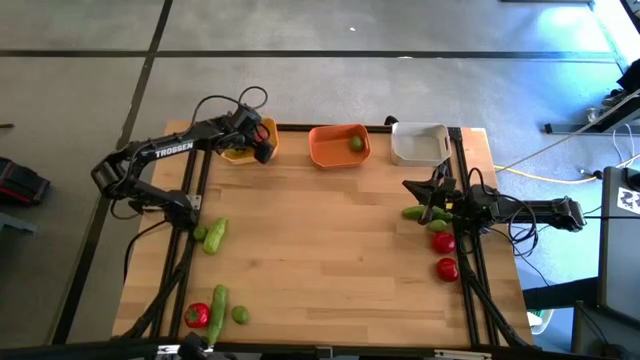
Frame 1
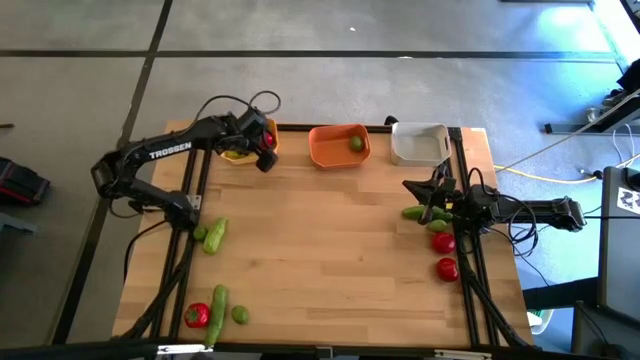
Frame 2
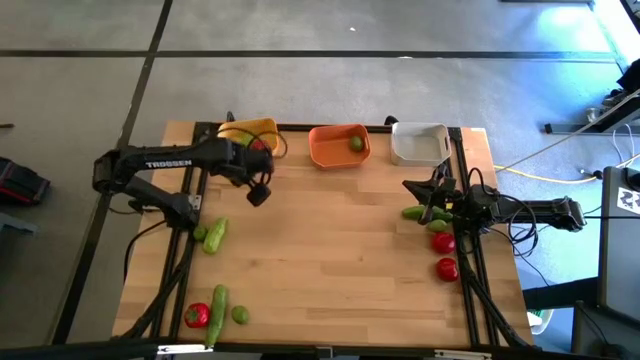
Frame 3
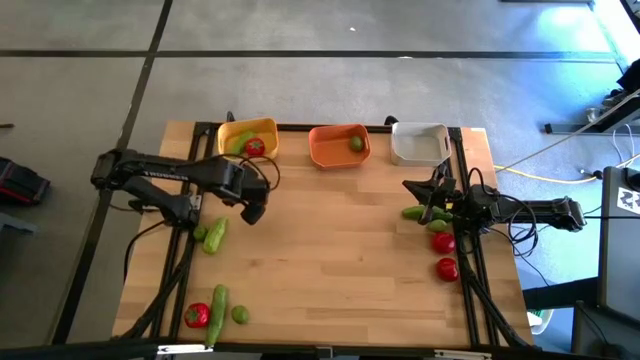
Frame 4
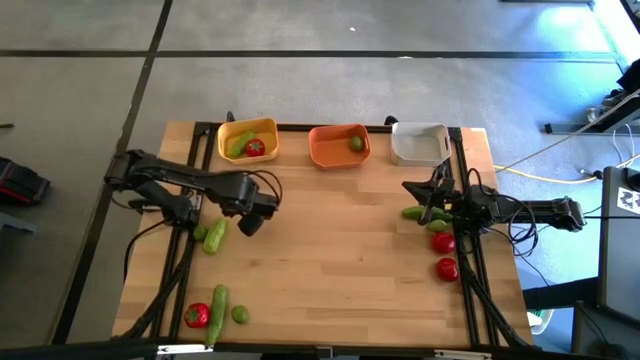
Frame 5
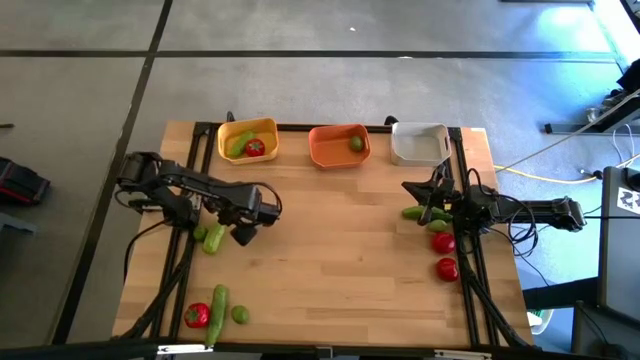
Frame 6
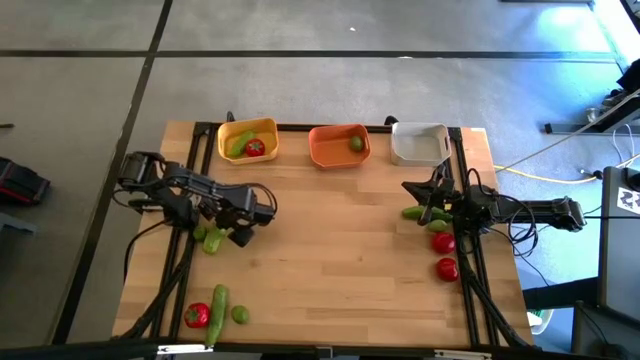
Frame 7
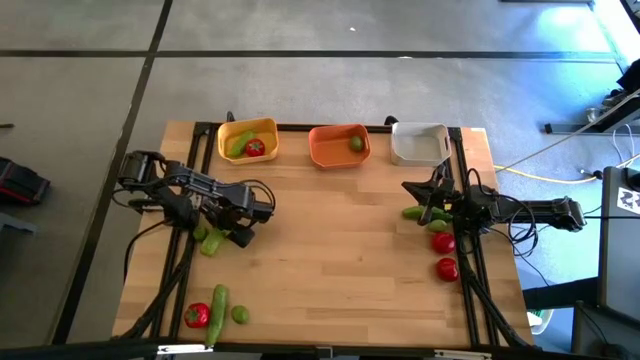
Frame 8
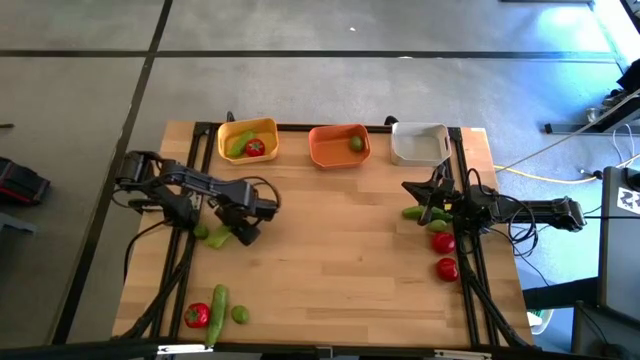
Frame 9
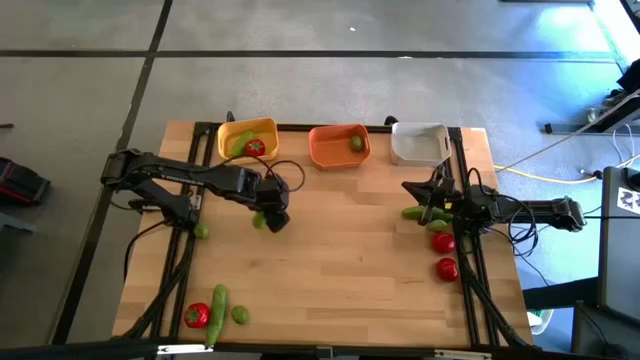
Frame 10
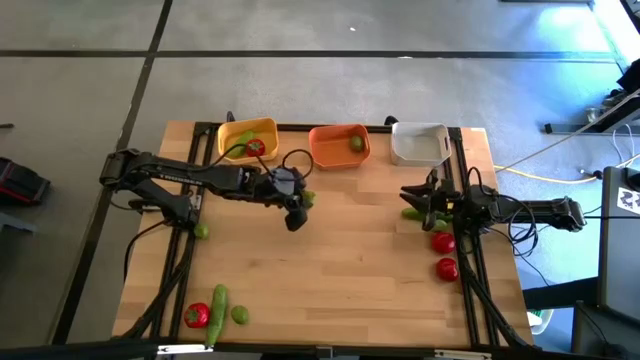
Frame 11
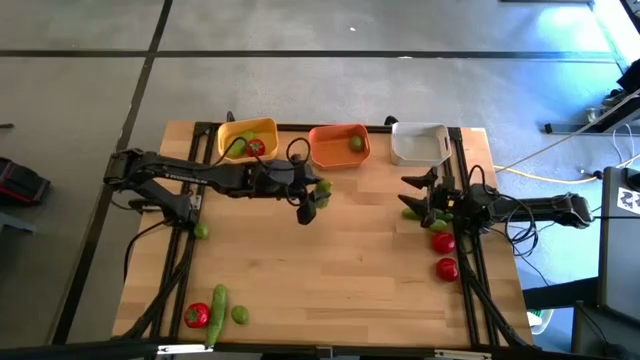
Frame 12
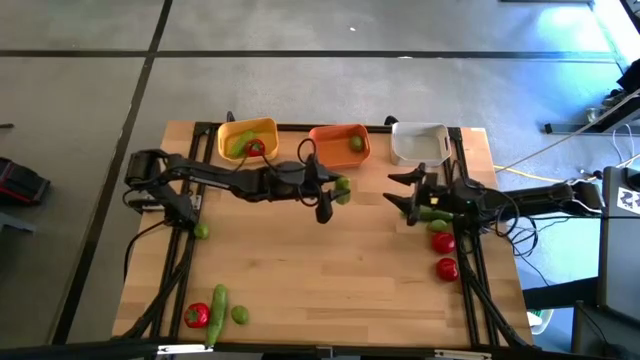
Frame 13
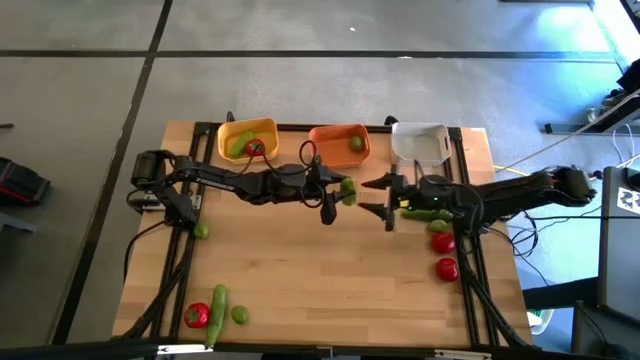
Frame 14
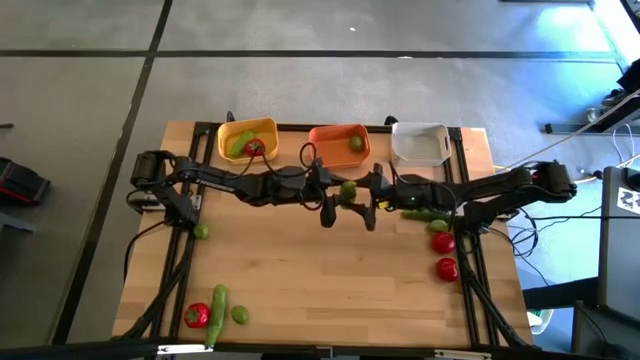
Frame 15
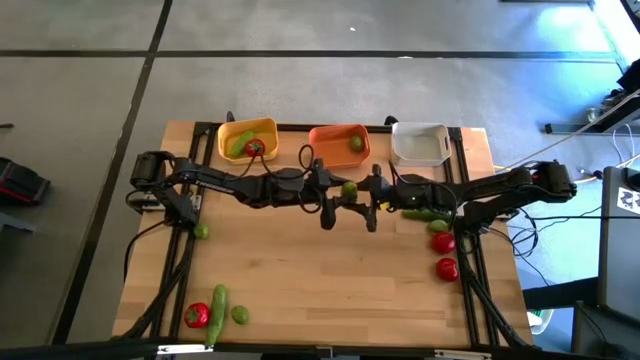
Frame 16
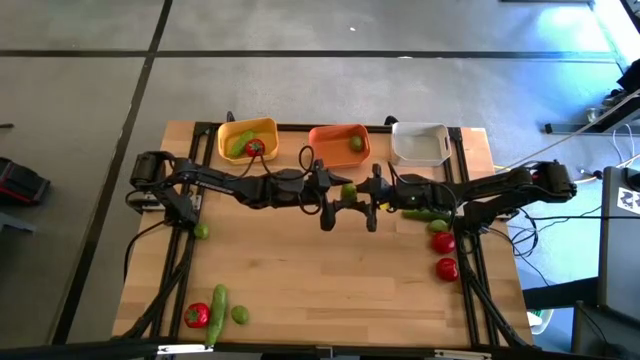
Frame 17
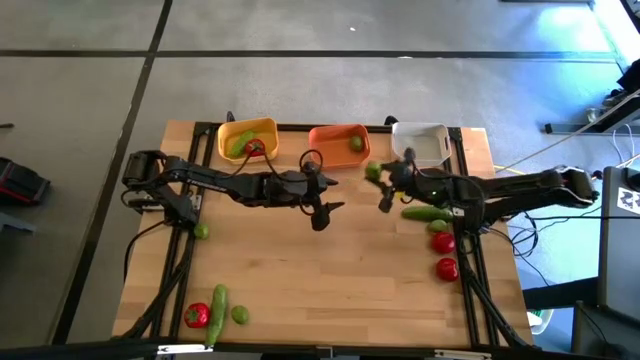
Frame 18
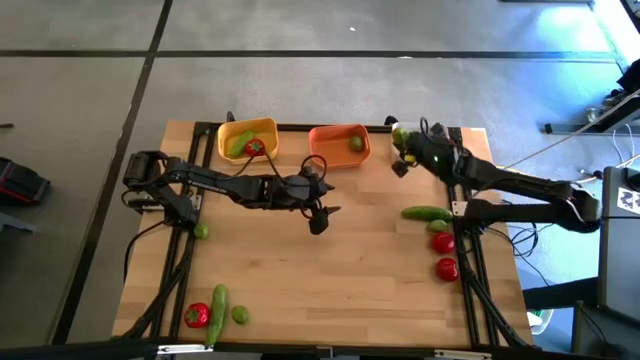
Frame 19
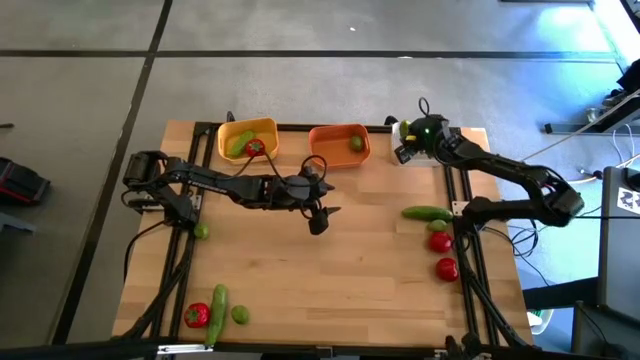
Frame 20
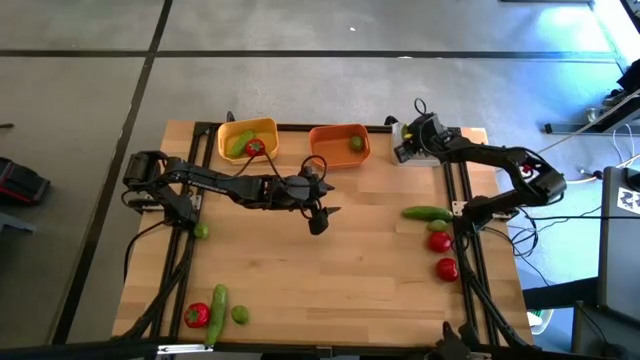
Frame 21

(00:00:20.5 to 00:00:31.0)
Task: Sort produce into baskets
Put the top left cucumber into the white bin

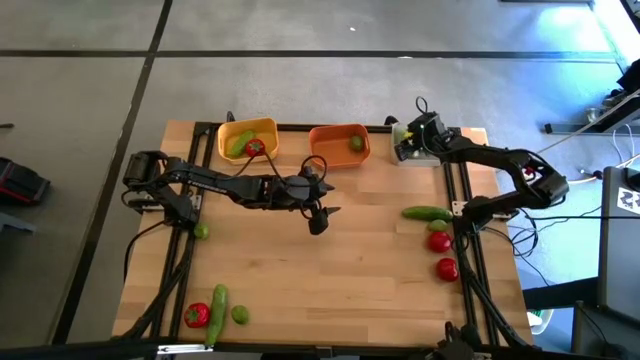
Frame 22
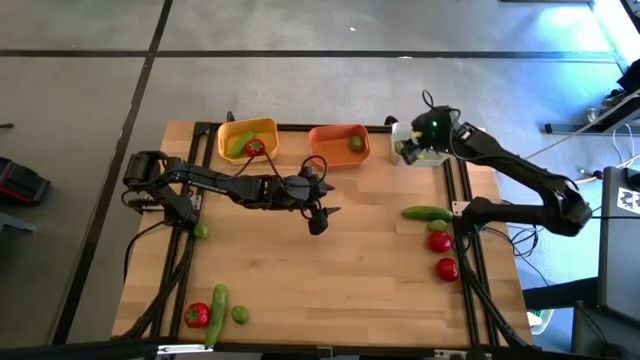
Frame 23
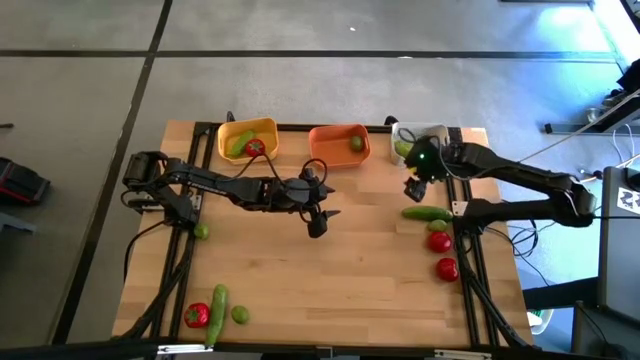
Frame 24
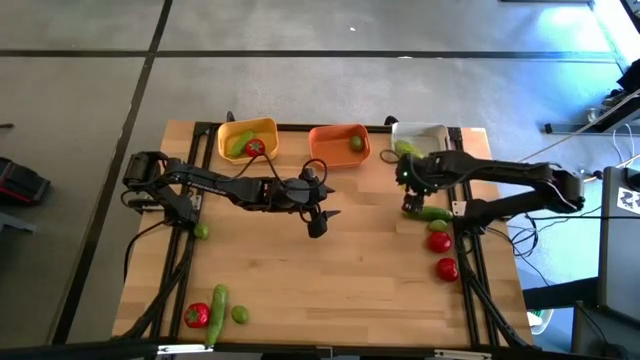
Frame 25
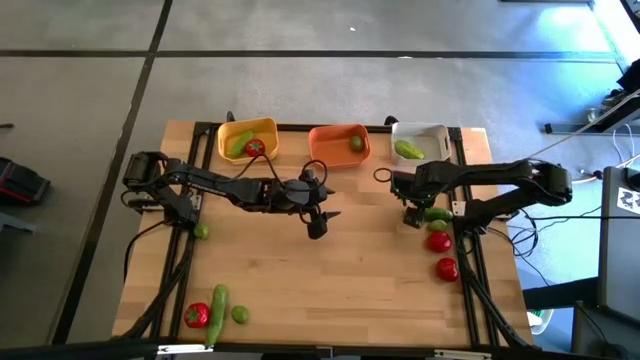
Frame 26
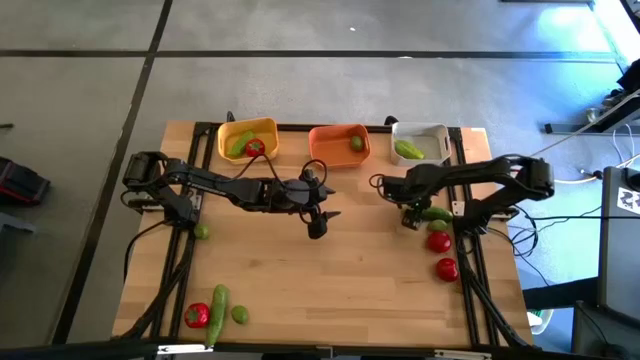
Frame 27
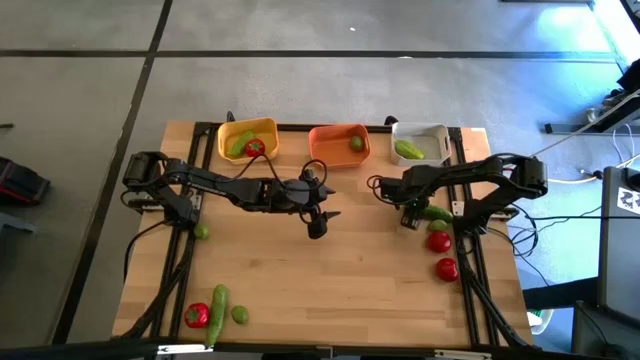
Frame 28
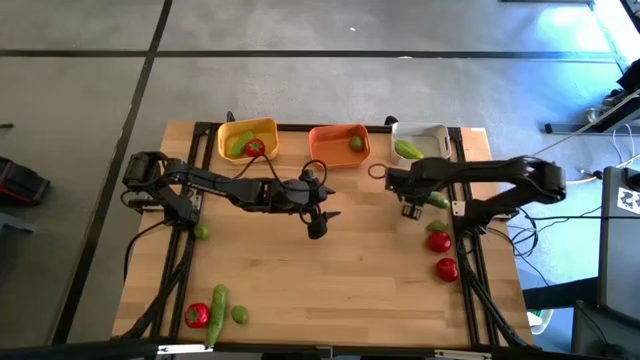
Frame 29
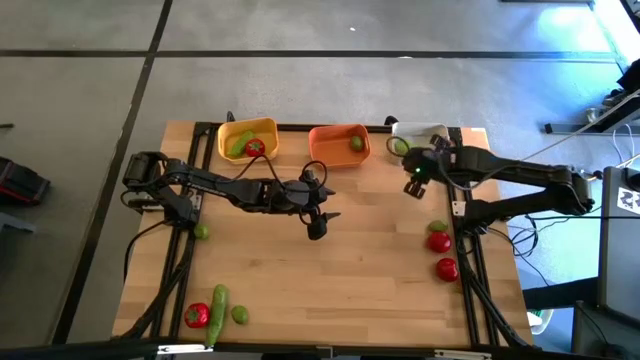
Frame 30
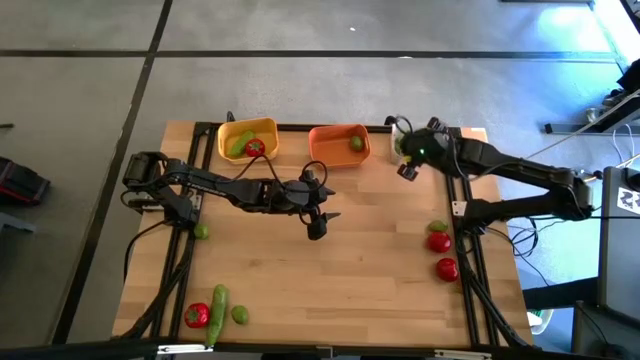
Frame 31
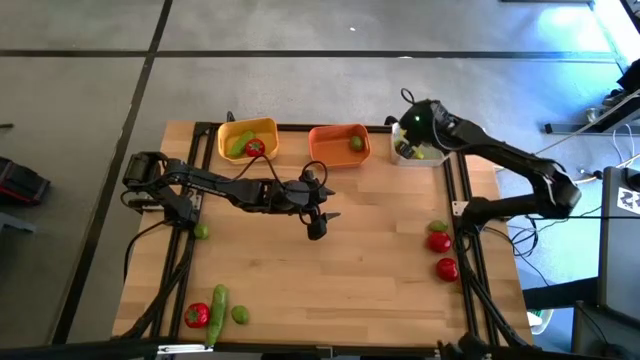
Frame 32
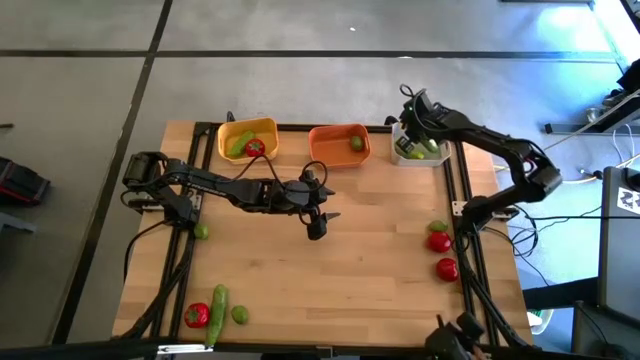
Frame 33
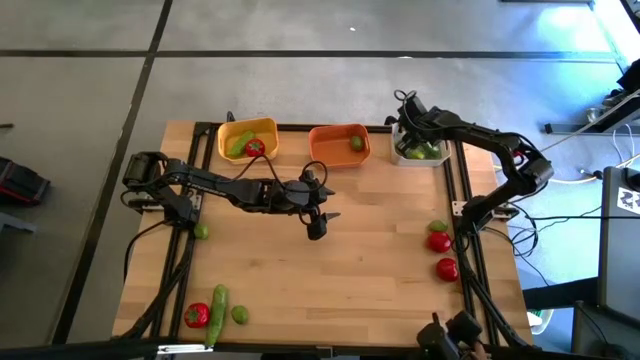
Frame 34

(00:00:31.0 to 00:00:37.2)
Put the top cucumber into the white bin

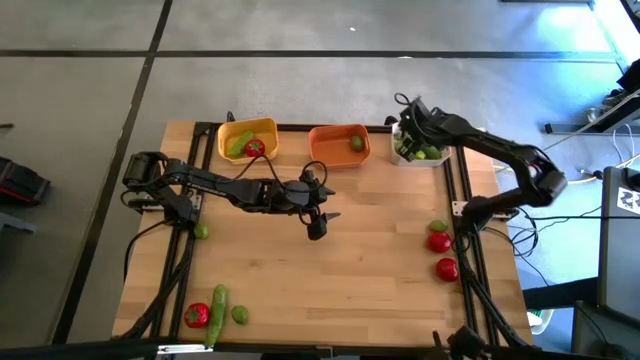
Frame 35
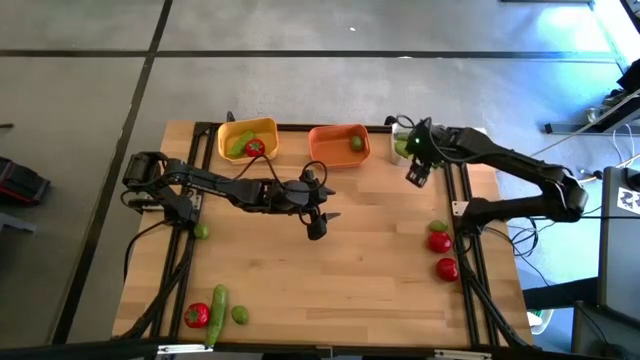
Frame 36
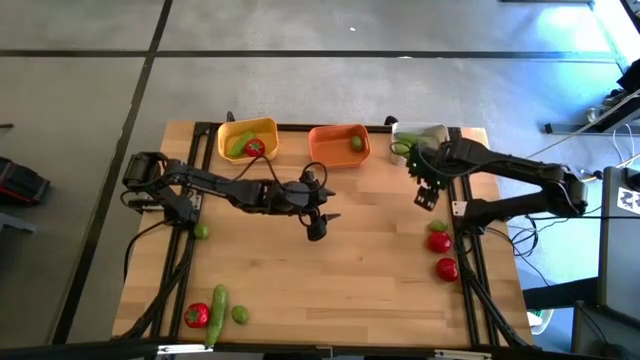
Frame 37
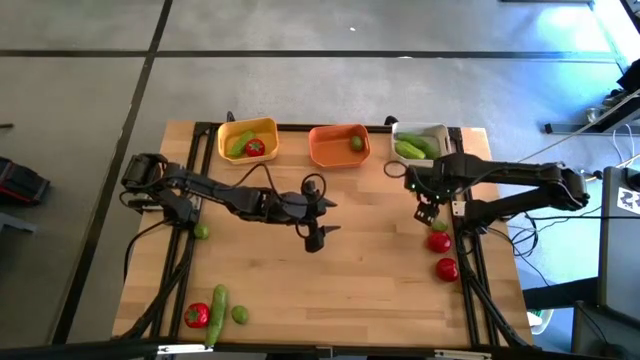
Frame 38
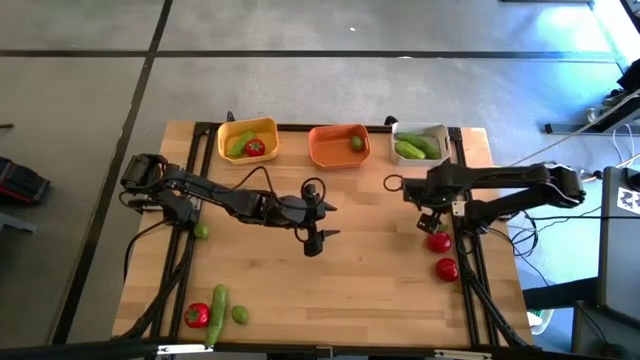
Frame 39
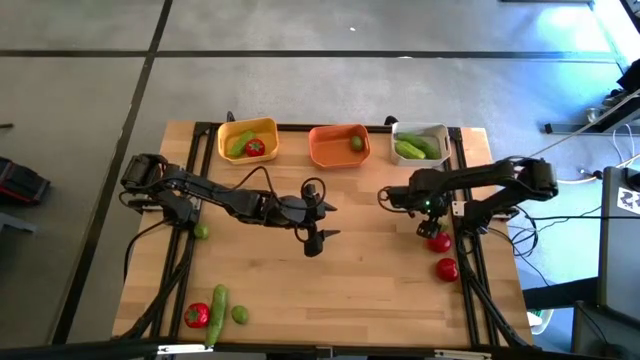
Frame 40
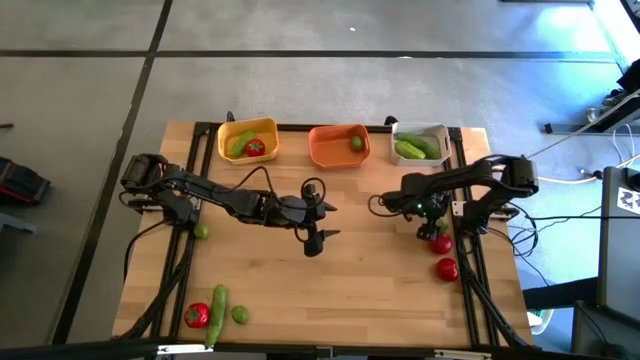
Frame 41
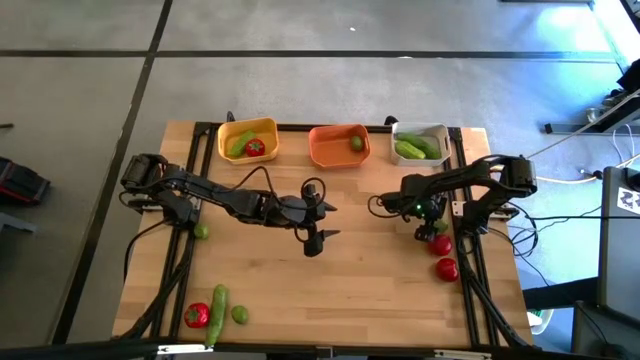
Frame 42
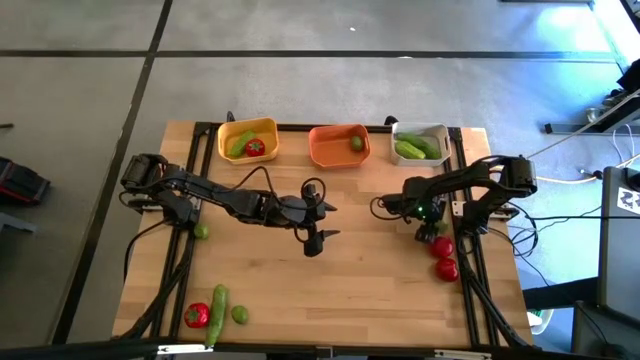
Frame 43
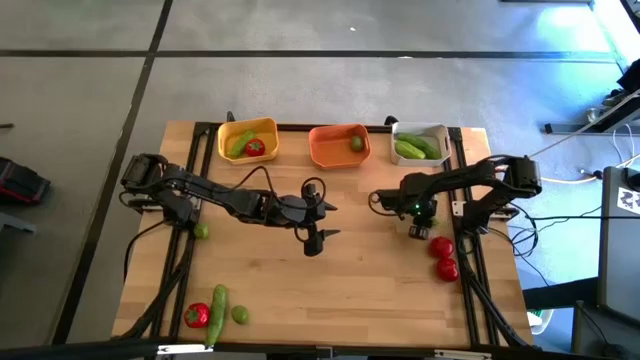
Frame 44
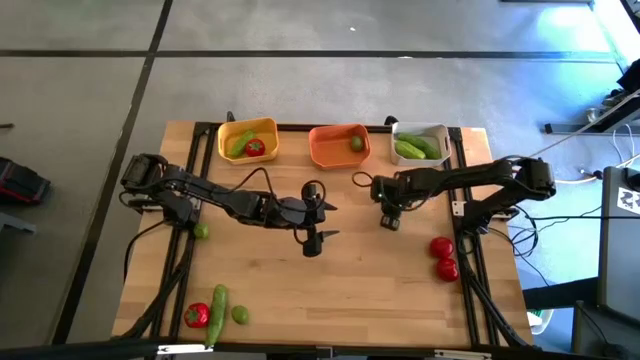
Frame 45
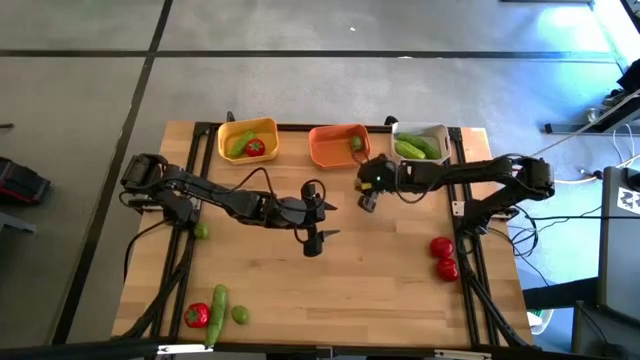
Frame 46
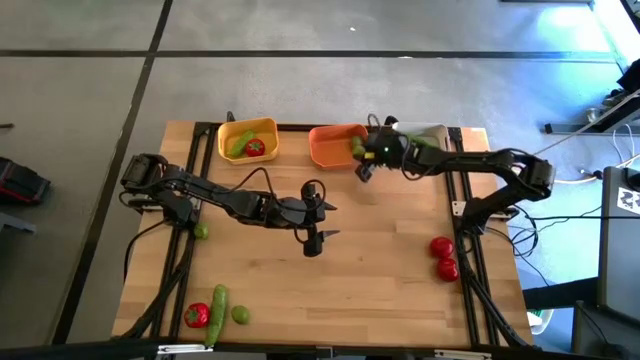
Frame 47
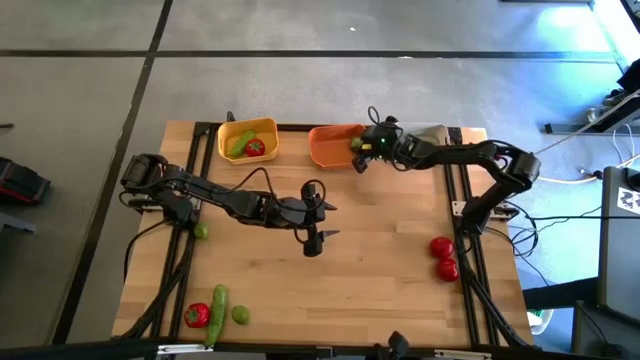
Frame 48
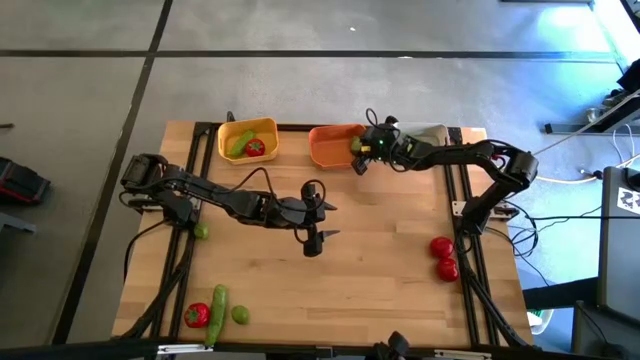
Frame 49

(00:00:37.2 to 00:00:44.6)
Put the top right lime into the orange bin
